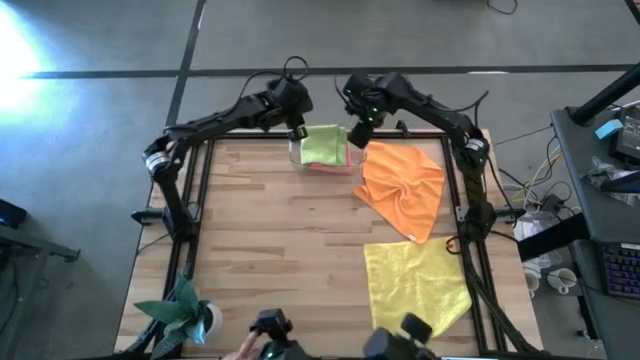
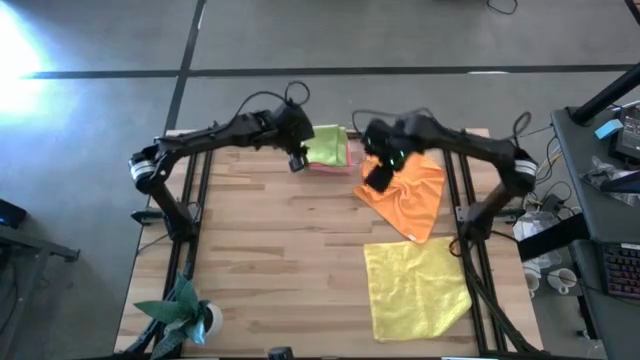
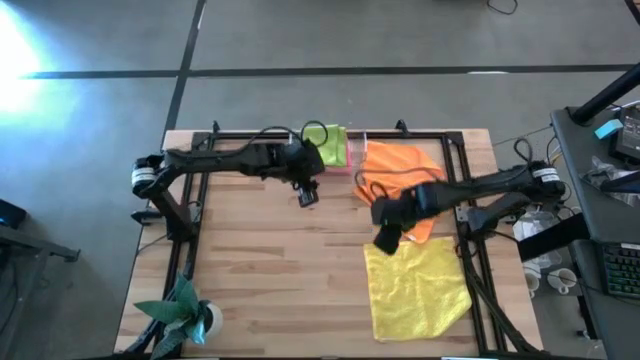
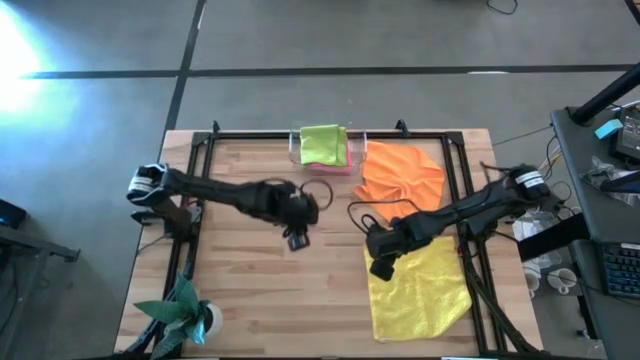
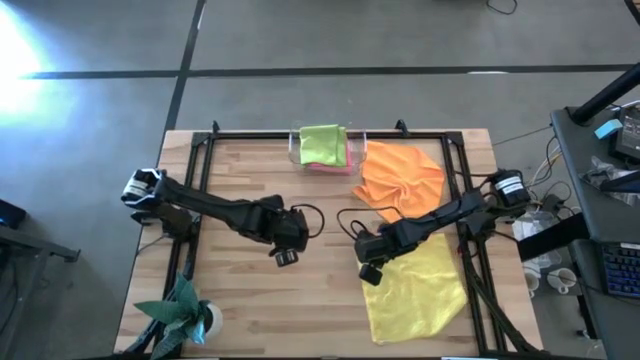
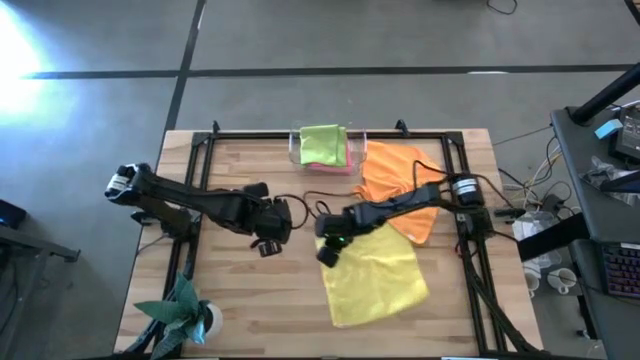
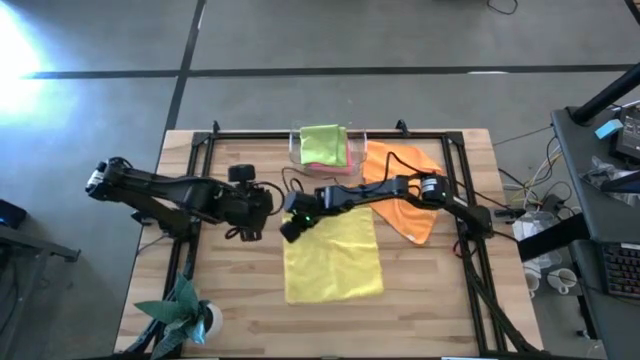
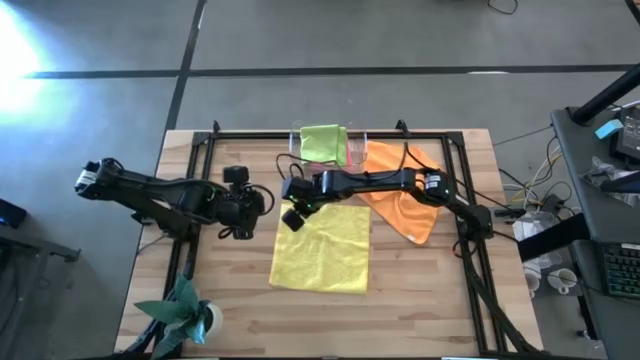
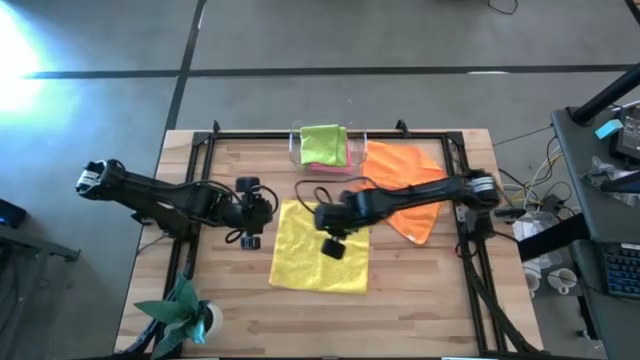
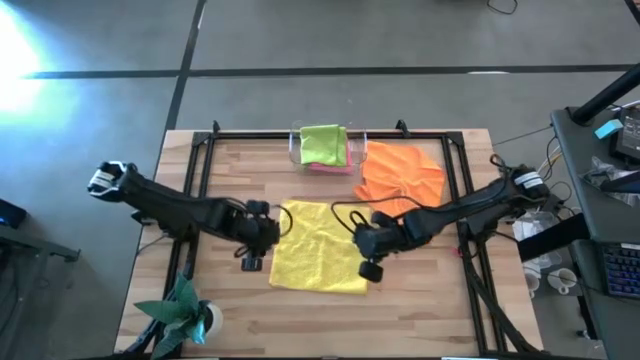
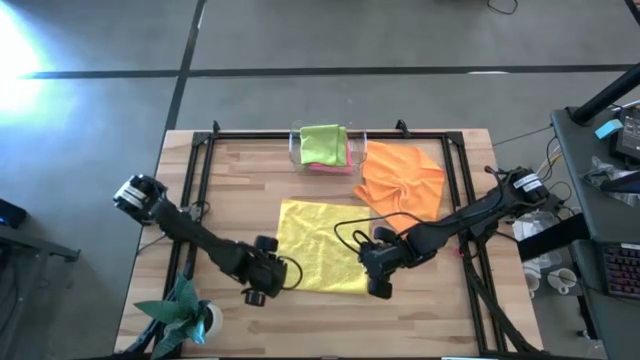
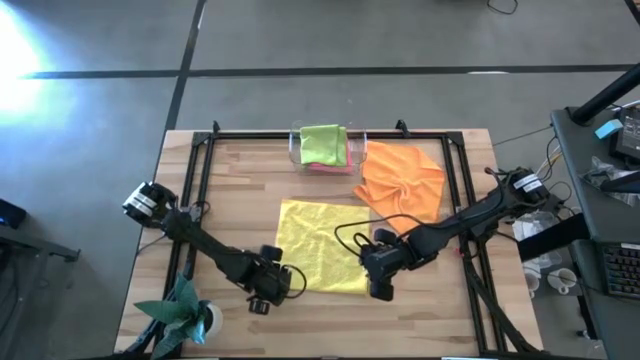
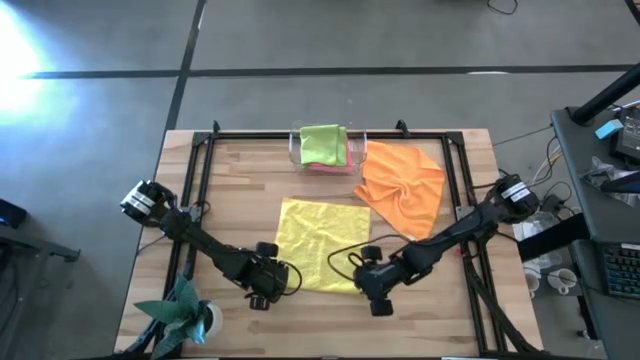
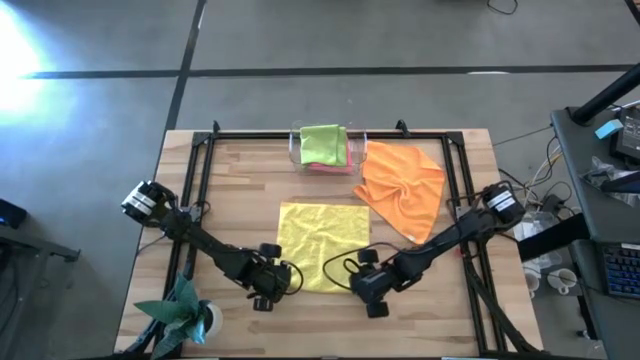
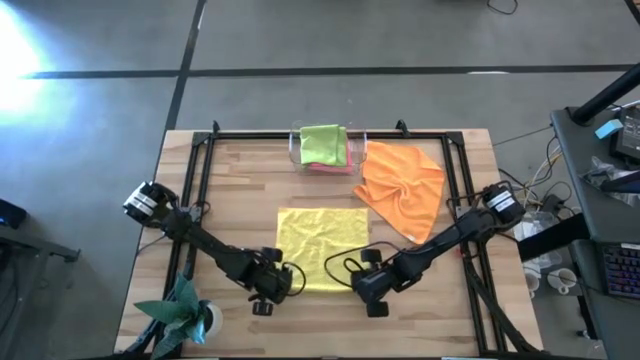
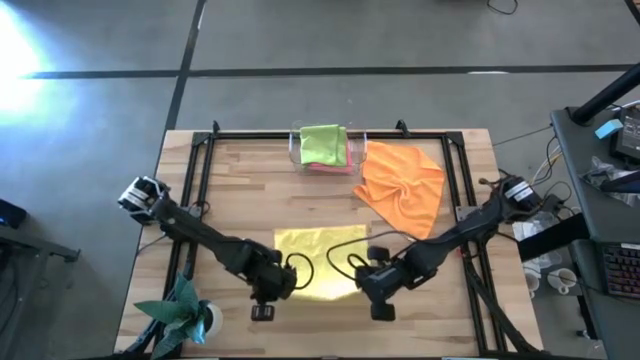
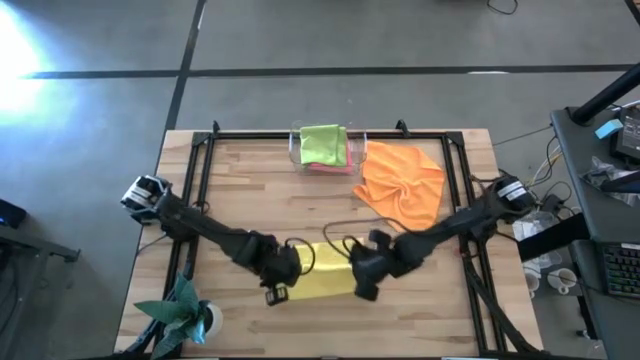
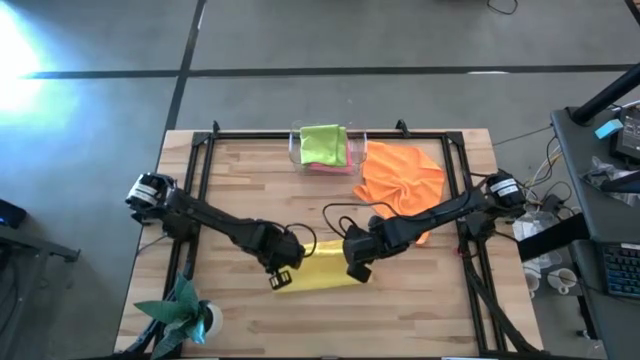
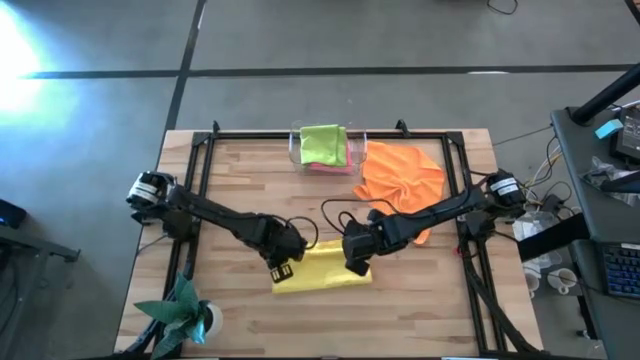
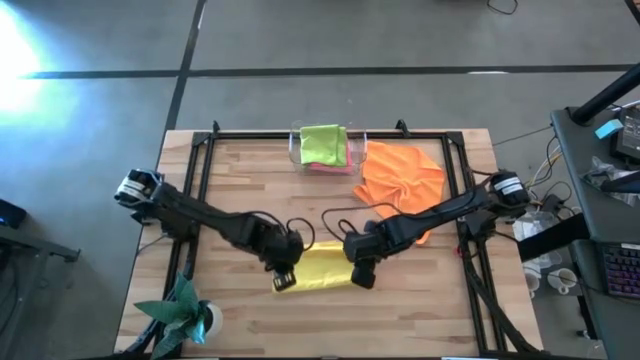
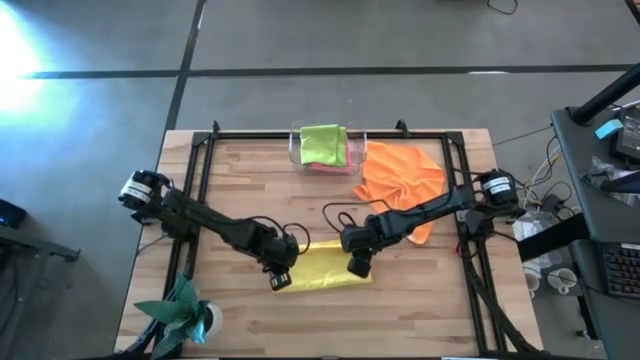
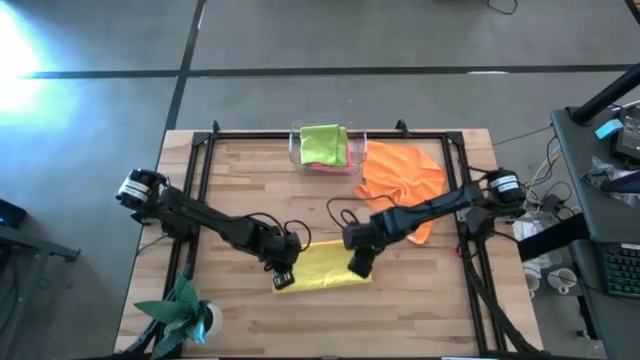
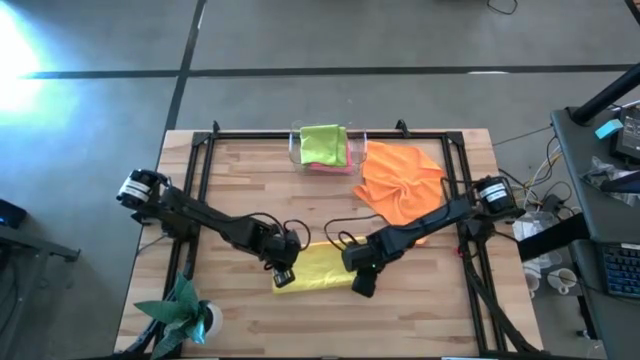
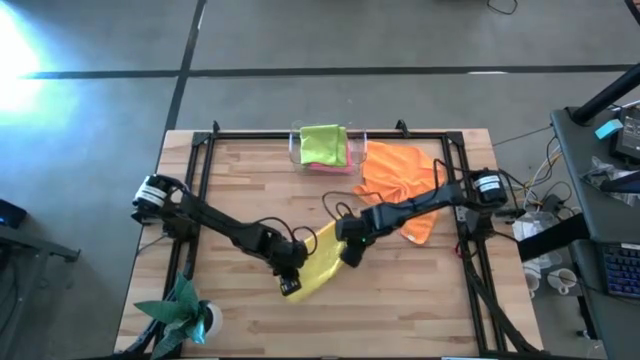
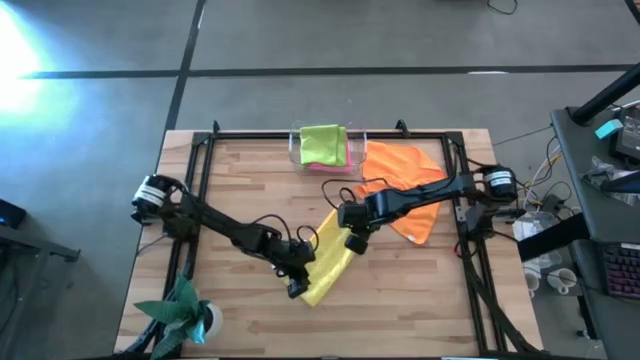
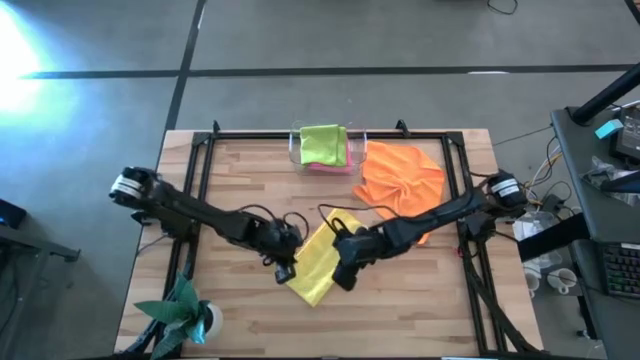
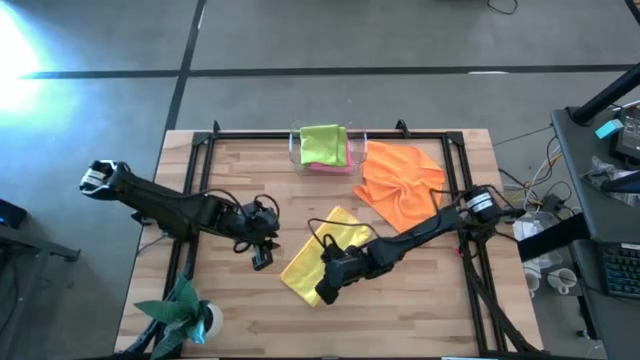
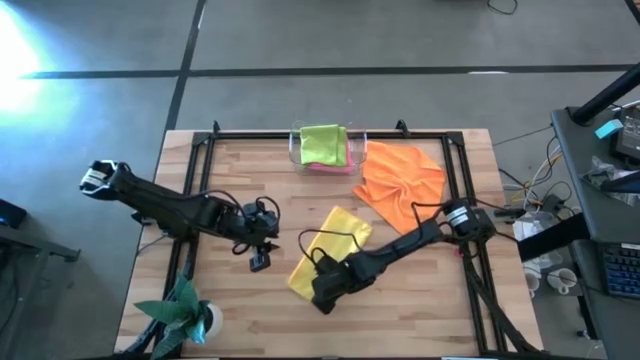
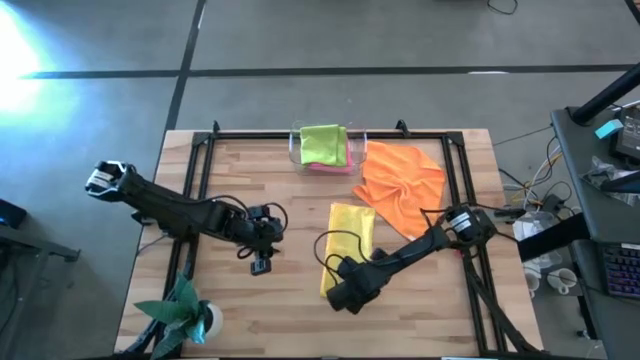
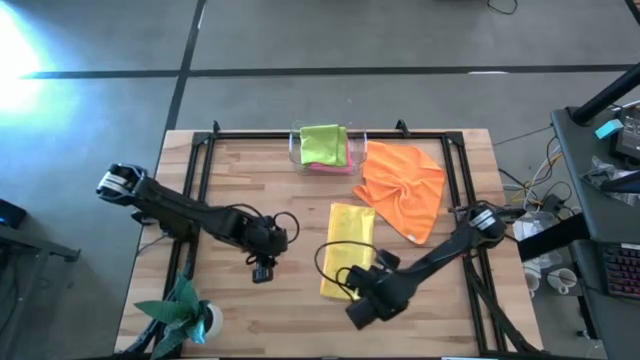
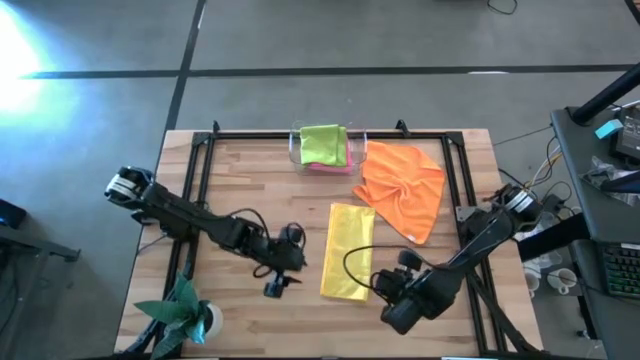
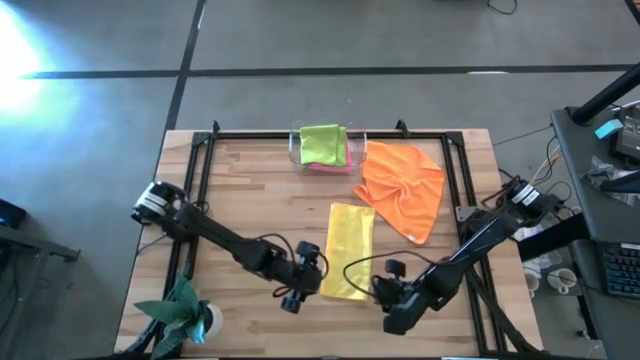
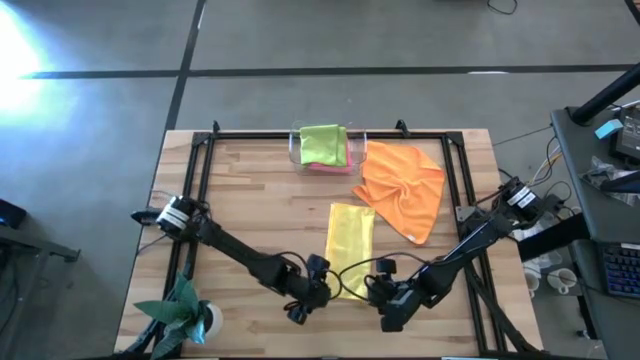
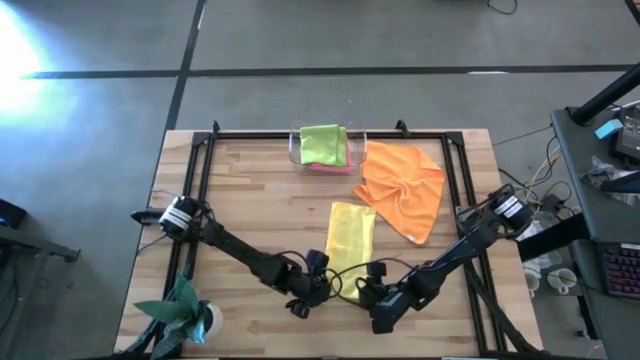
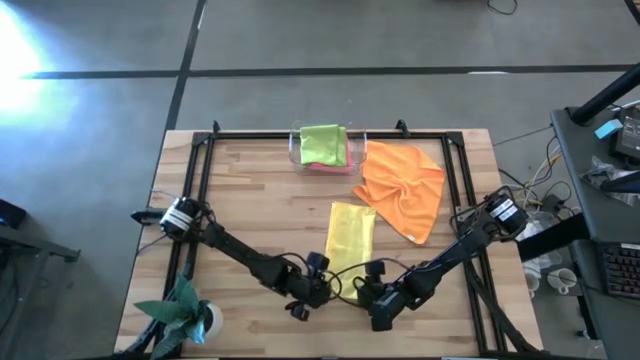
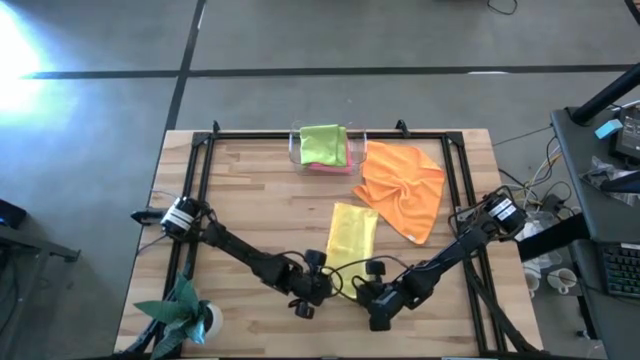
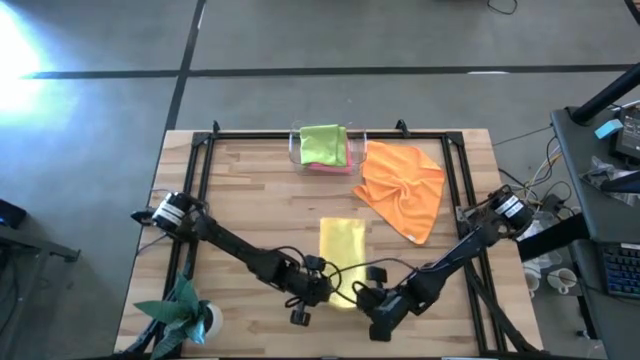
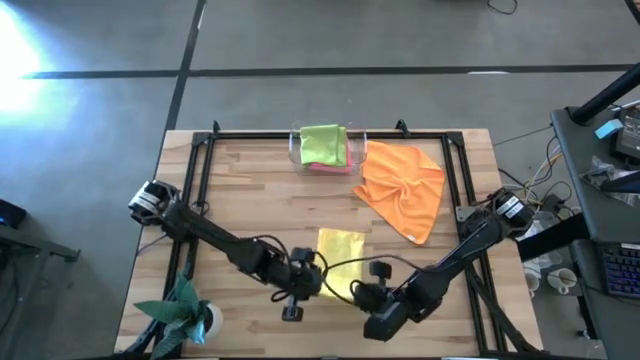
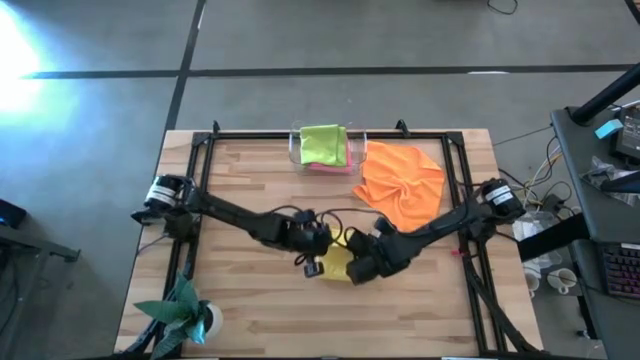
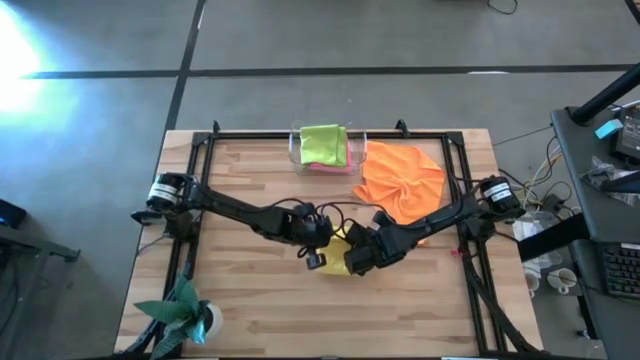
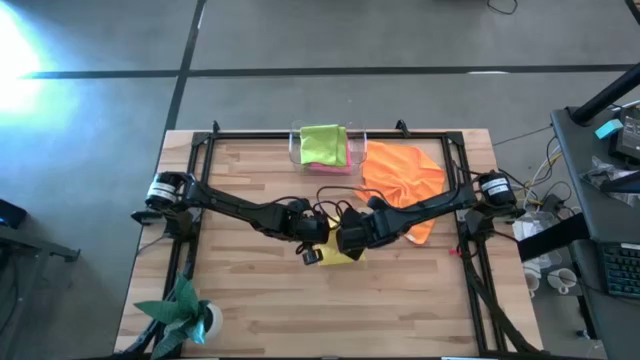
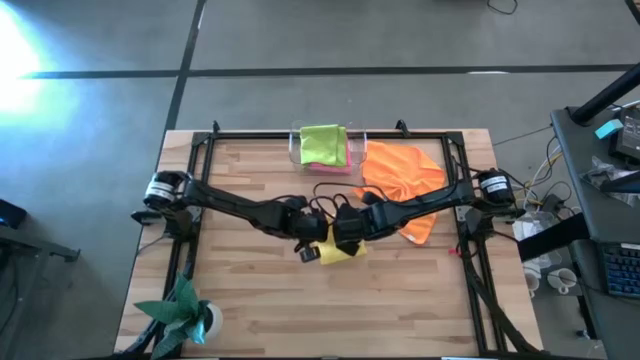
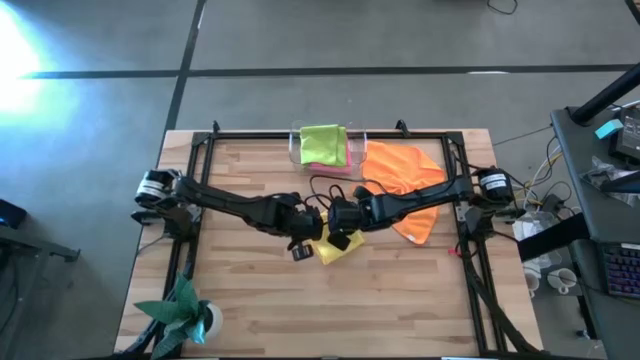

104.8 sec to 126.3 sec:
Task: Fold microfiber towels
Fold the yellow microfiber towel
